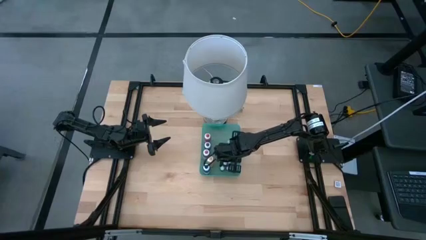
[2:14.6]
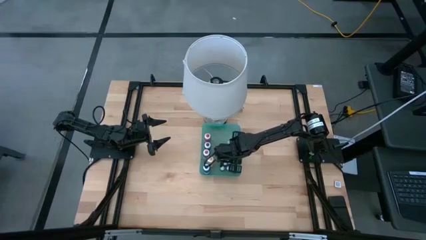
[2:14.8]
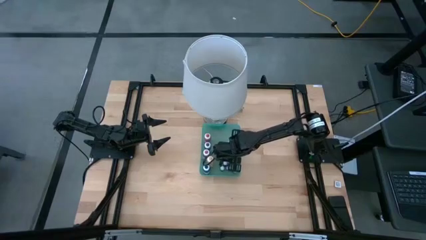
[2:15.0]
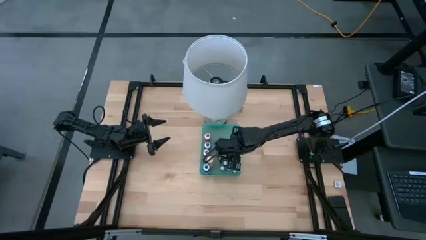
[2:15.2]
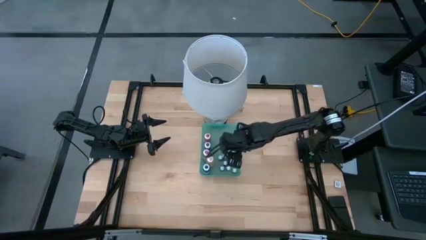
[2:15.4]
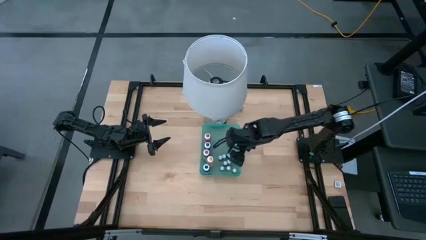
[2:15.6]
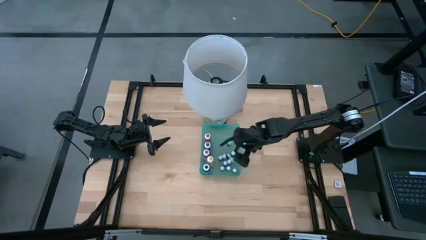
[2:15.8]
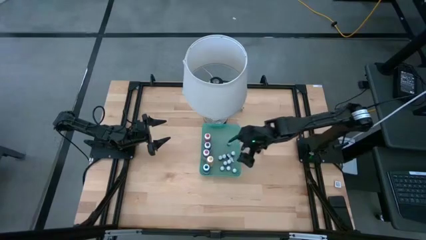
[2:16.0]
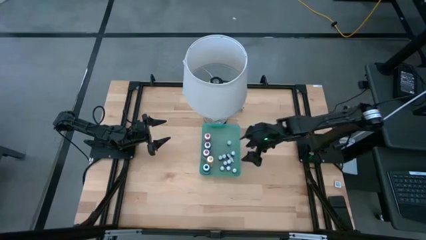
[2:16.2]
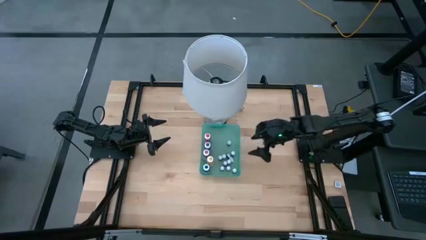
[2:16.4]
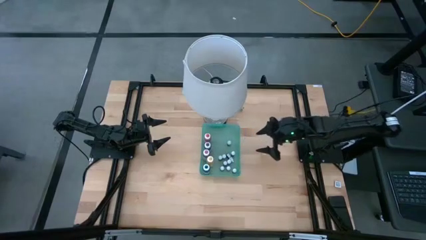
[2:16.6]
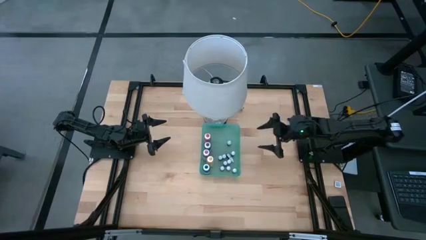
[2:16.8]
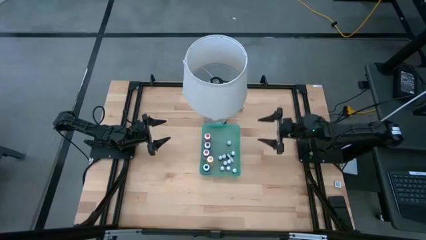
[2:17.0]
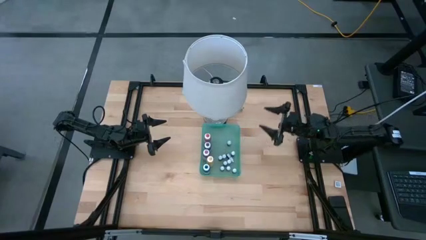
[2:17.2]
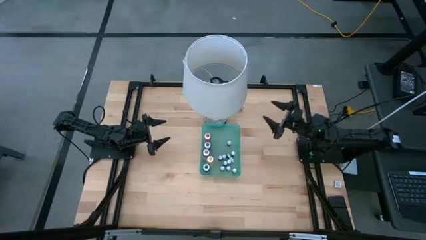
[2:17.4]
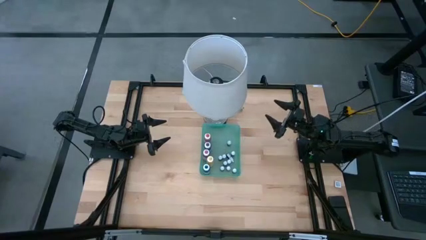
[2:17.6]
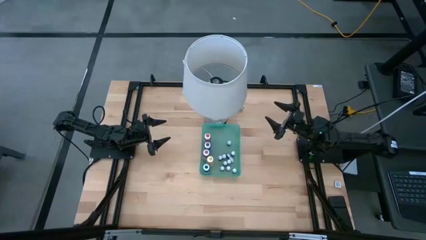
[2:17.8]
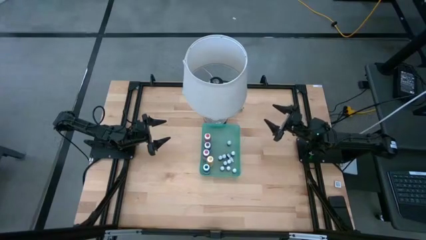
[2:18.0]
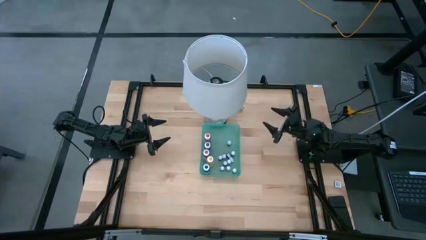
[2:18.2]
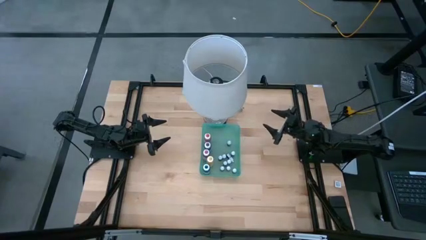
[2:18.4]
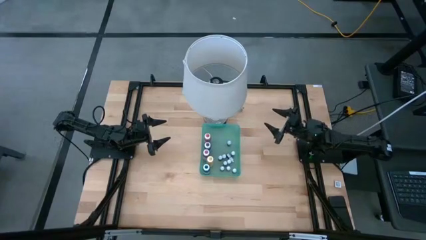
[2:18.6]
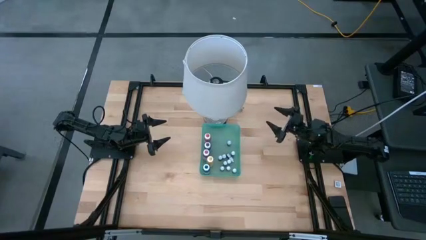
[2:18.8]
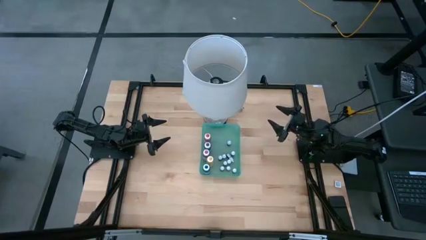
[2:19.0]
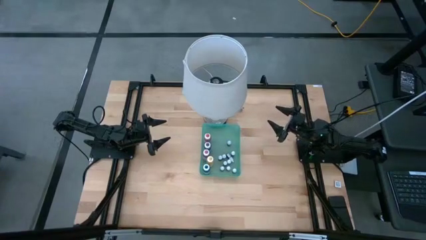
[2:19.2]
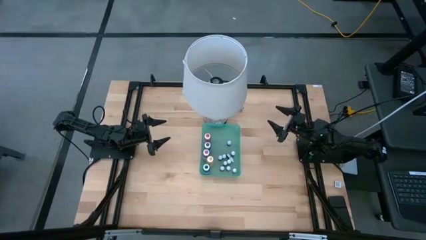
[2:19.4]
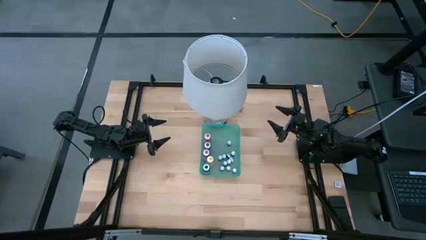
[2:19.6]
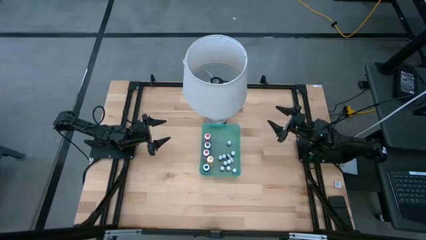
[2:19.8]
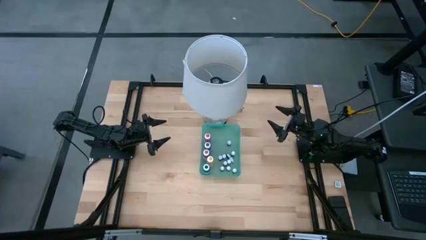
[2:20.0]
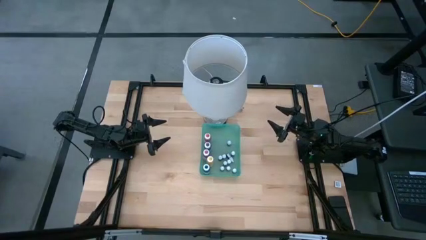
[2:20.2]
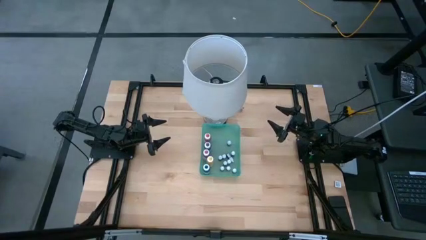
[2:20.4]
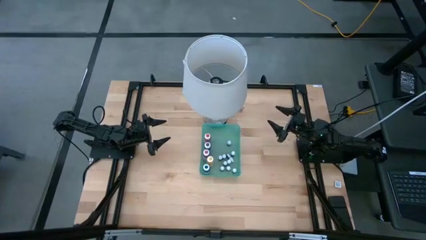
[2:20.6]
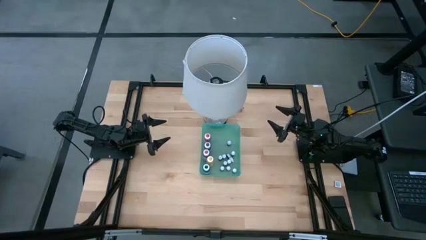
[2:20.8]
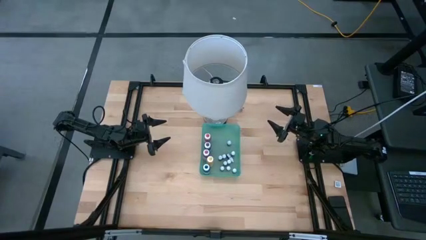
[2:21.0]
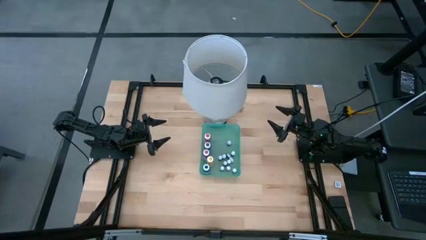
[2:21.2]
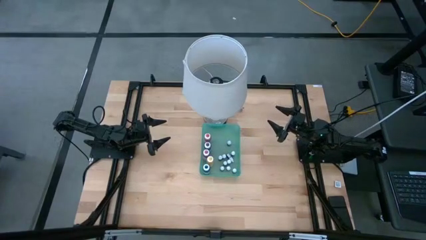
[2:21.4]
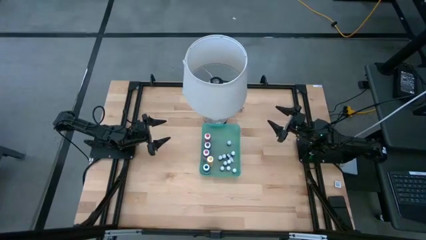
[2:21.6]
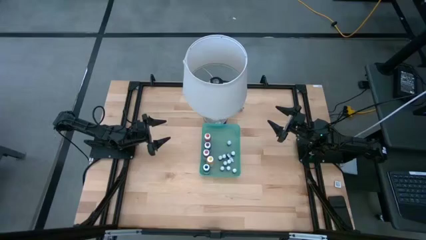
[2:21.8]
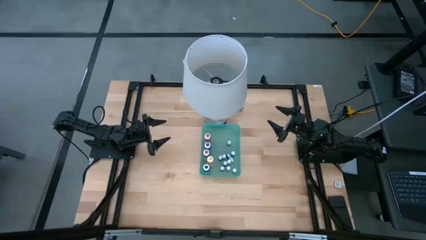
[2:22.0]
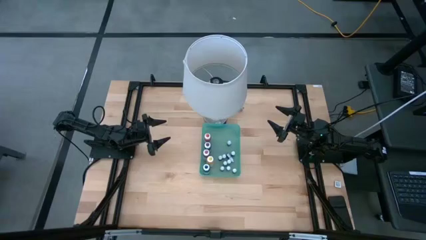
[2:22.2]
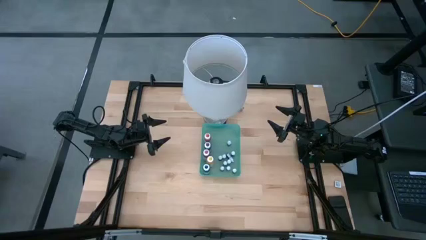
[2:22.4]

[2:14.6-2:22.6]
Task: Pick & Place food coloring
Return to Home Position

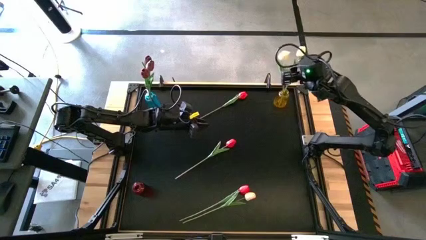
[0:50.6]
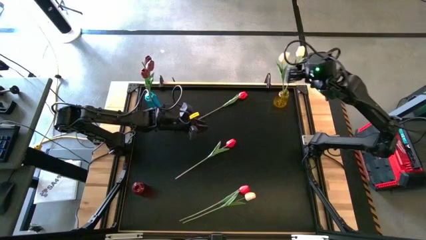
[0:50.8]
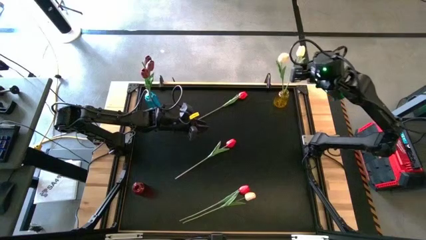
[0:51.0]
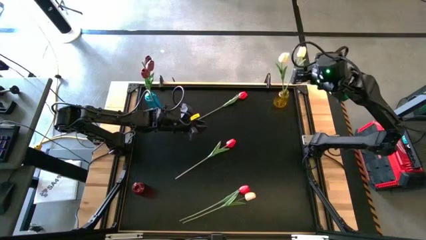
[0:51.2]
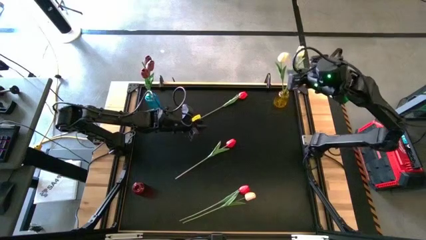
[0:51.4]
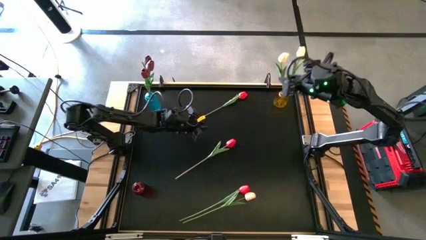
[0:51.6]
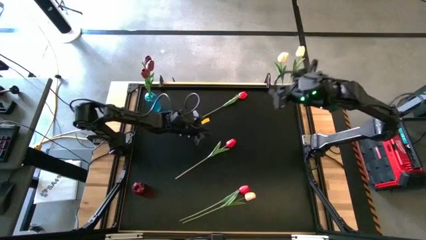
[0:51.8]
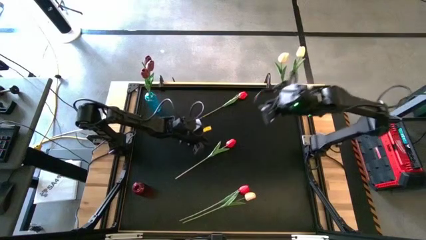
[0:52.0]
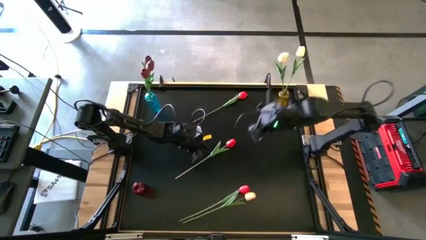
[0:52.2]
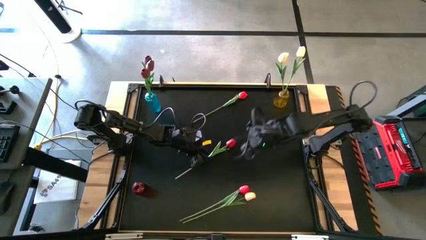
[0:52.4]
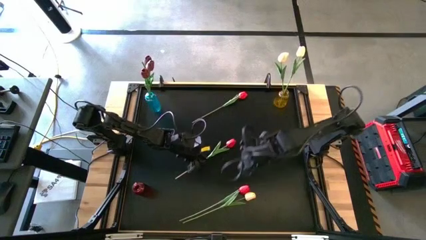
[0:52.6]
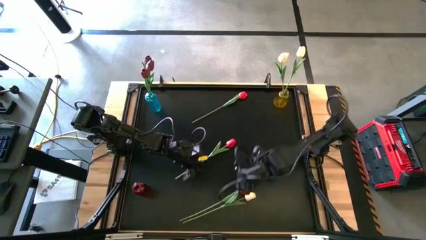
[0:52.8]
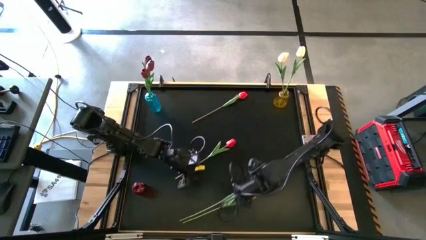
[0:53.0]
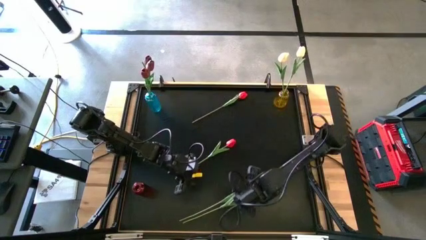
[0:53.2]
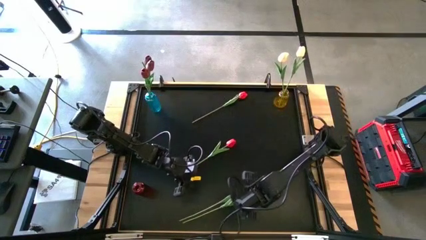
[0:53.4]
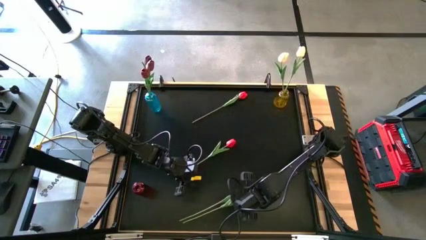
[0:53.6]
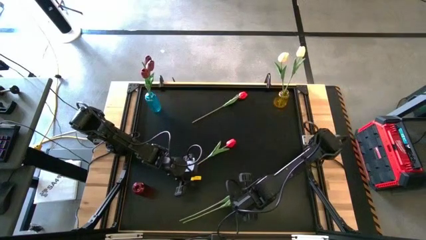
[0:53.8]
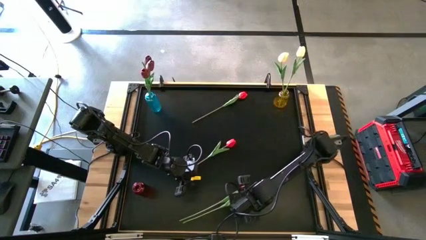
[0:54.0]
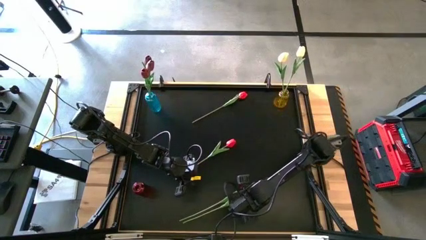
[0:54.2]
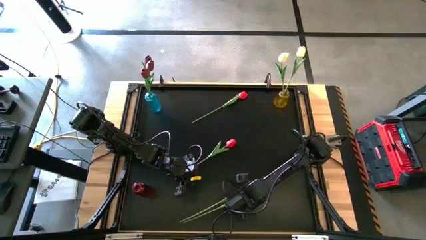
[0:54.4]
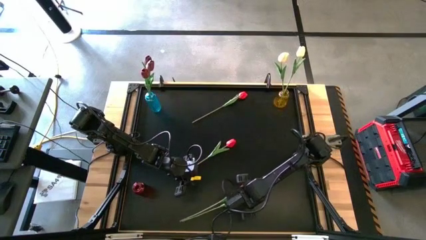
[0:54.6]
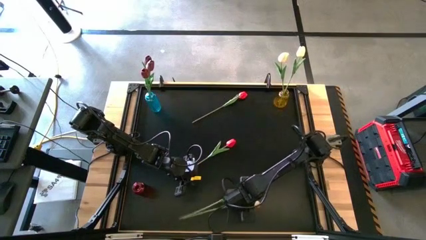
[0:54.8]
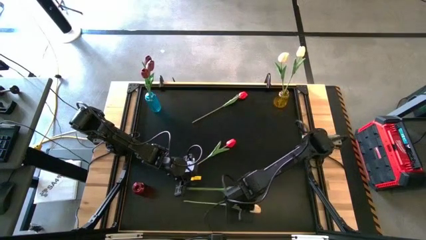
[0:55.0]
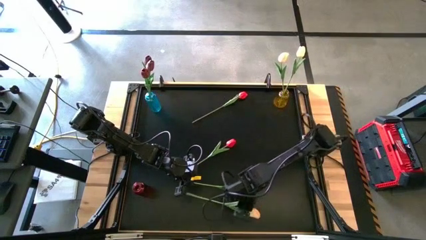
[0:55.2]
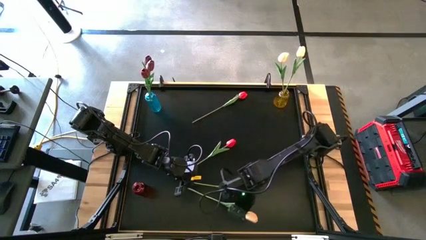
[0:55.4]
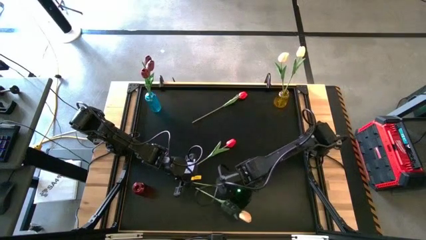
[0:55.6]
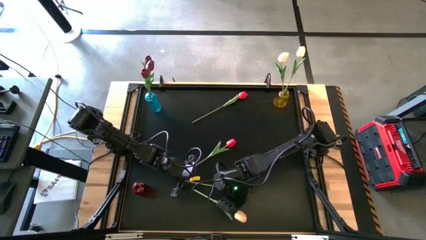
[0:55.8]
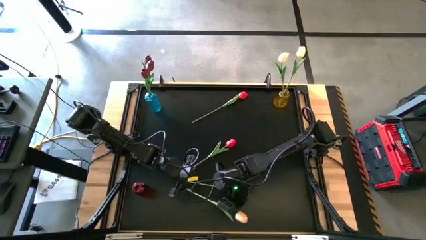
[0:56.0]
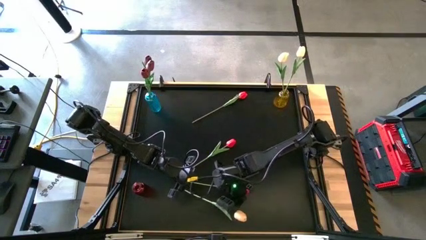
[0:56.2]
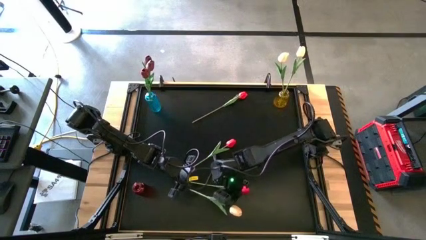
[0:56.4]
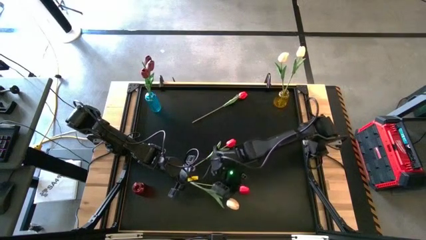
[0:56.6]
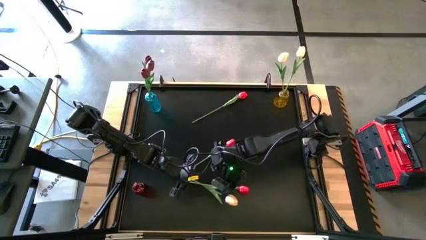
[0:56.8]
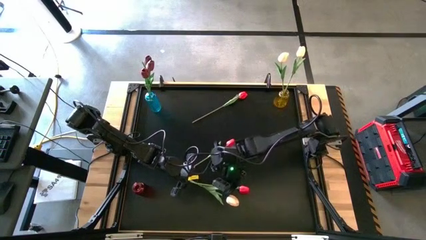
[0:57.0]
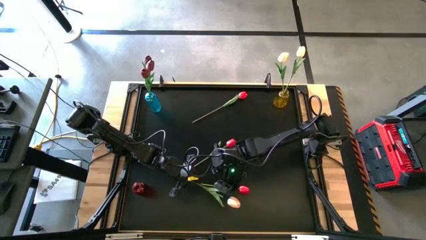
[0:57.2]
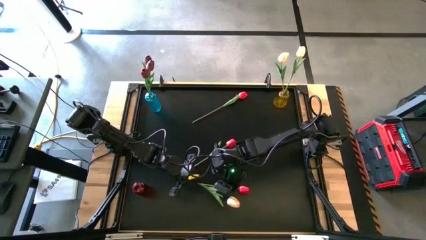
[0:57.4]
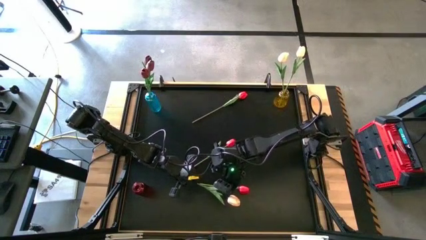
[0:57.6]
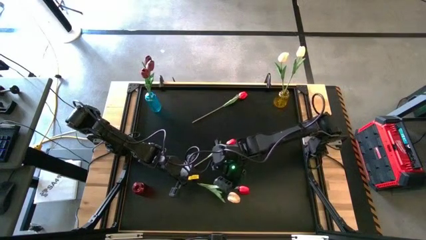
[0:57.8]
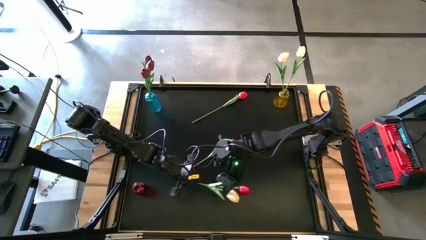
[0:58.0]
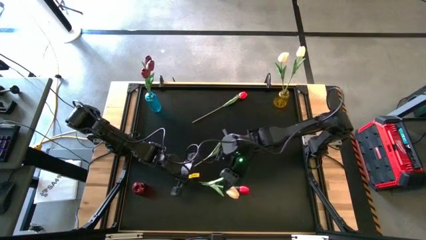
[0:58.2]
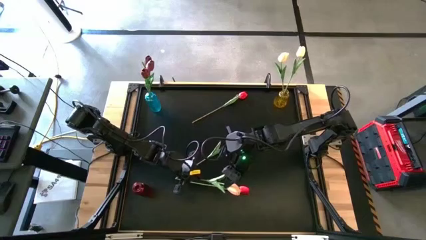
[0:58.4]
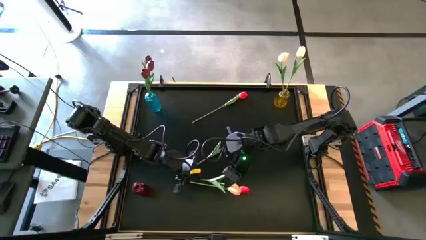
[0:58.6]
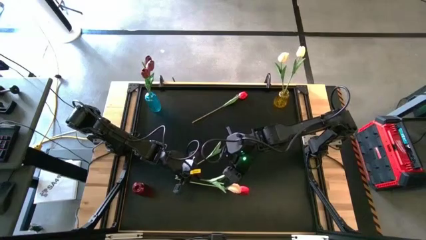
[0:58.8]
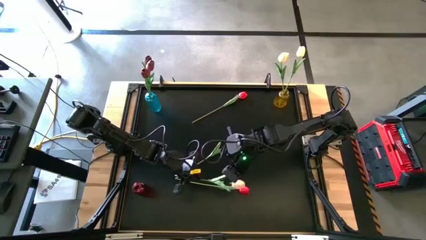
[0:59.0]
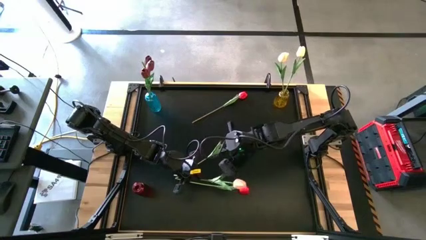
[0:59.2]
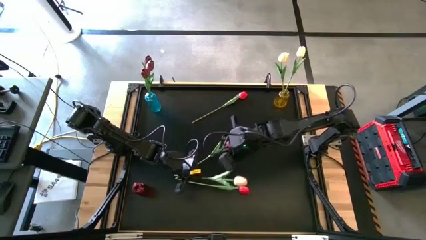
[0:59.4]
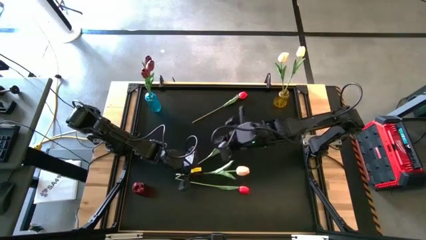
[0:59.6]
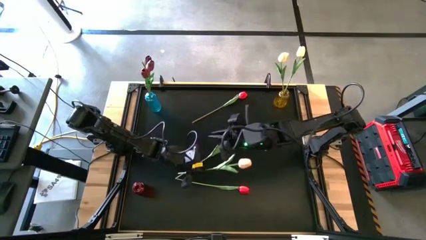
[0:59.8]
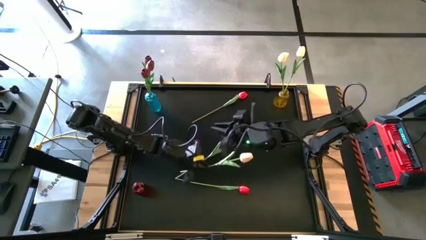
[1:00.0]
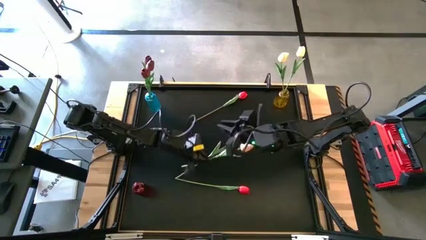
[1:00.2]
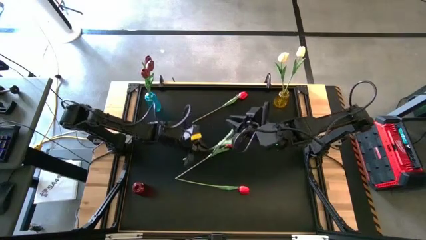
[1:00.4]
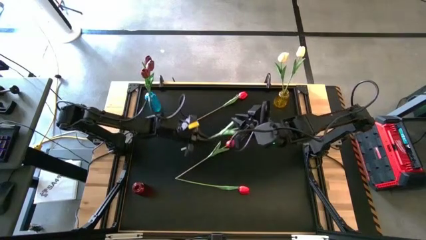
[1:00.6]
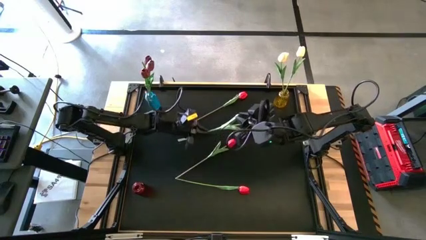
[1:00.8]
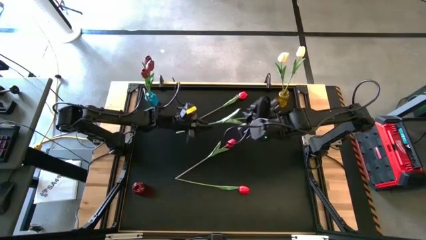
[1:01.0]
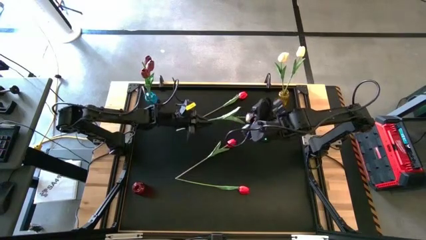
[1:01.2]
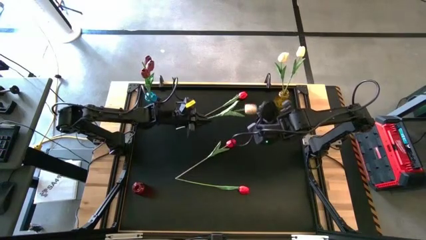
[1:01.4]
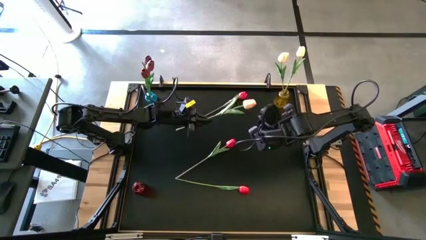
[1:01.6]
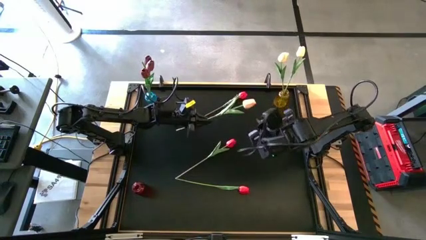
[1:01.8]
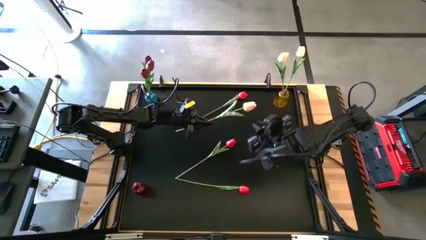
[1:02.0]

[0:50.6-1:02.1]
Task: Sort flowers into vase by color
Put the yellow flower into the yellow crystal vase
